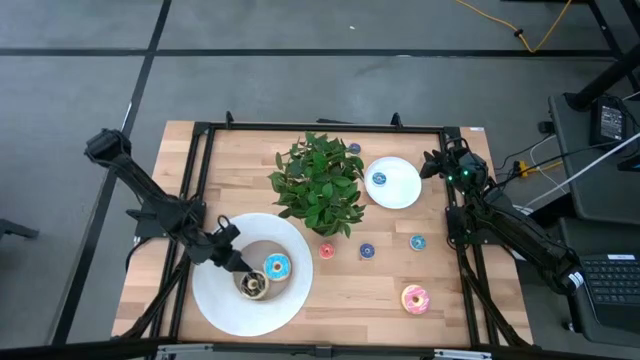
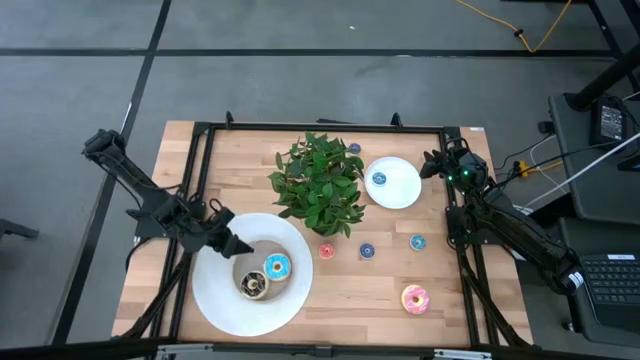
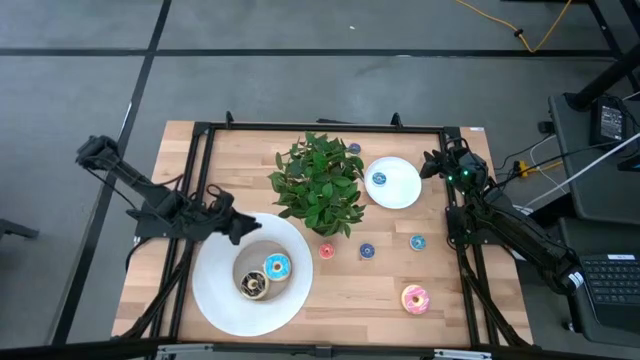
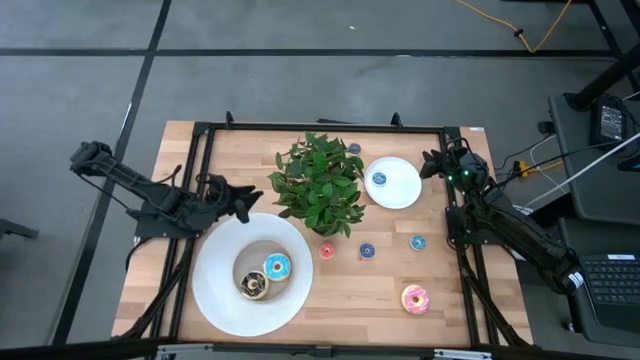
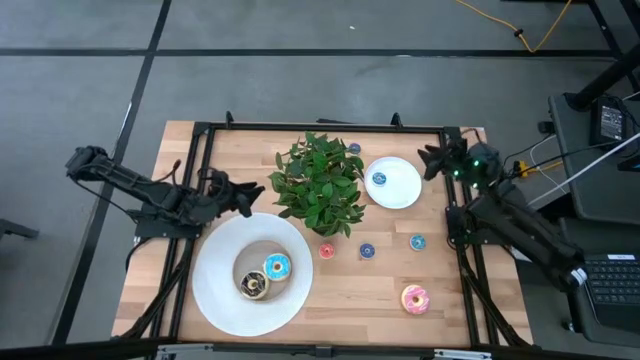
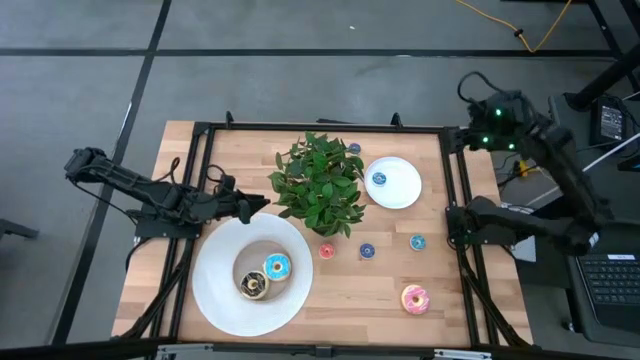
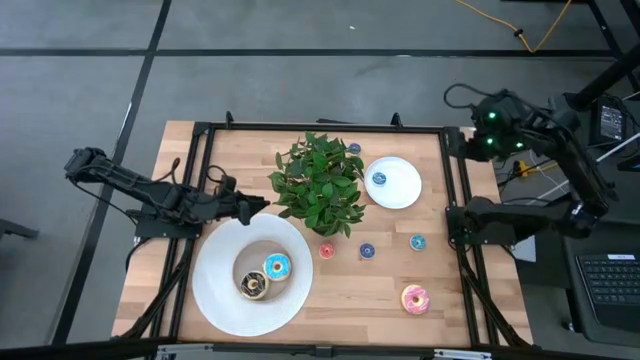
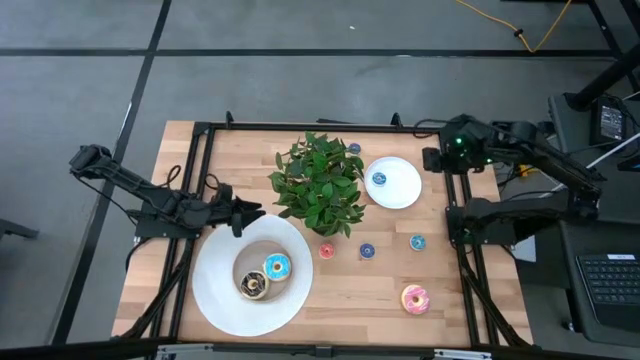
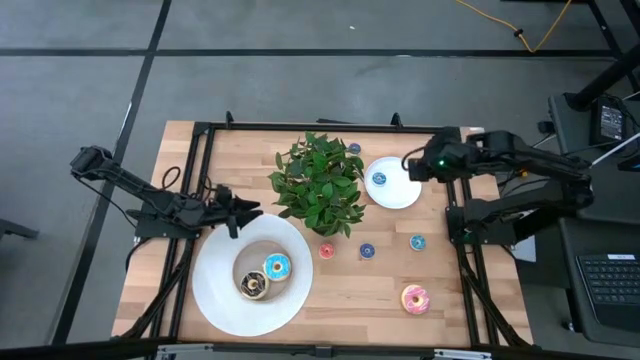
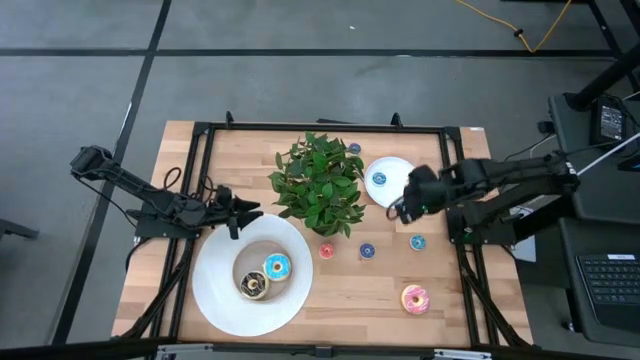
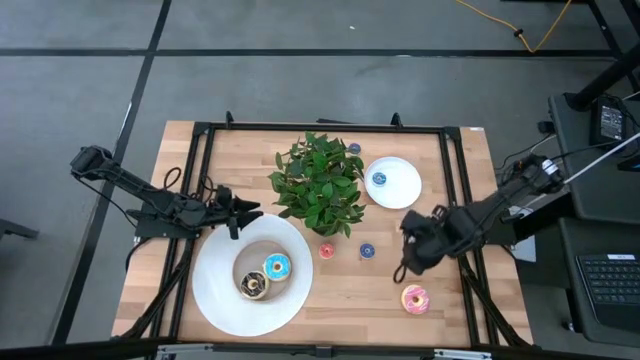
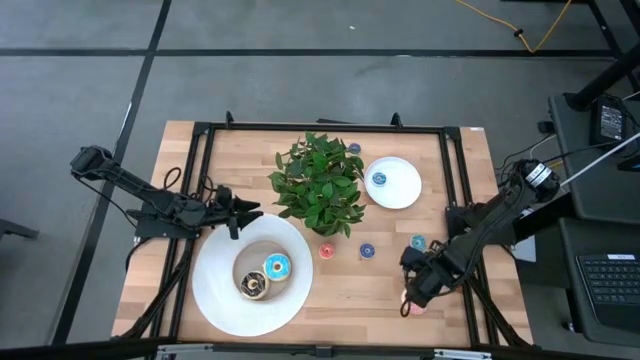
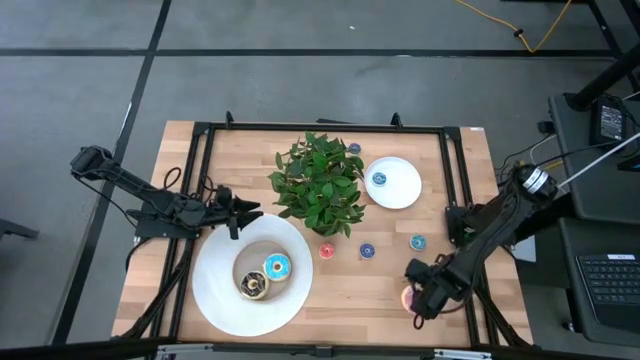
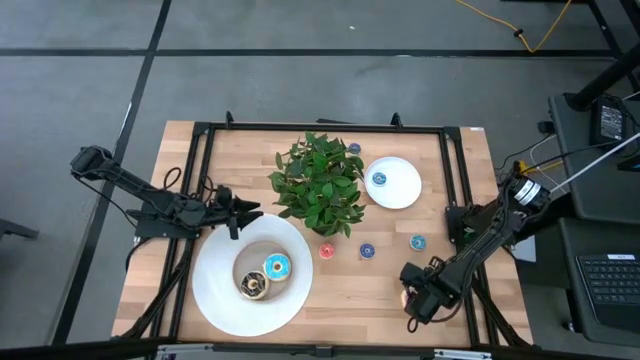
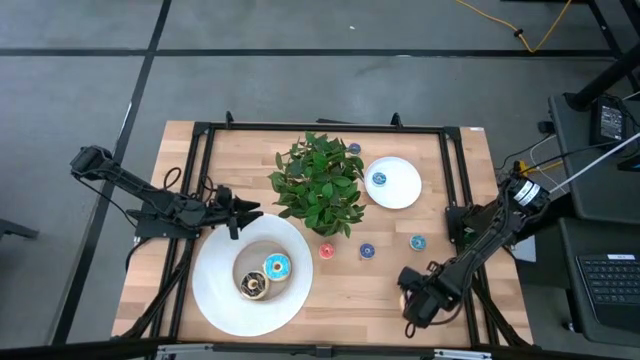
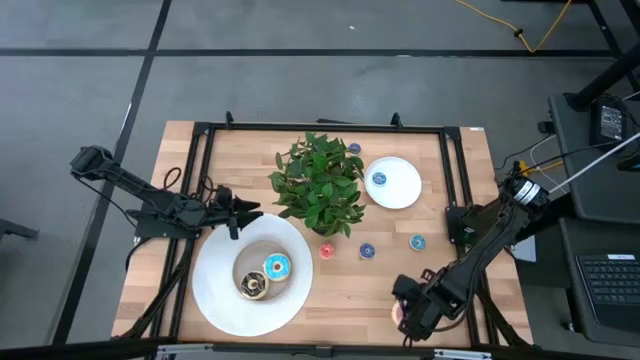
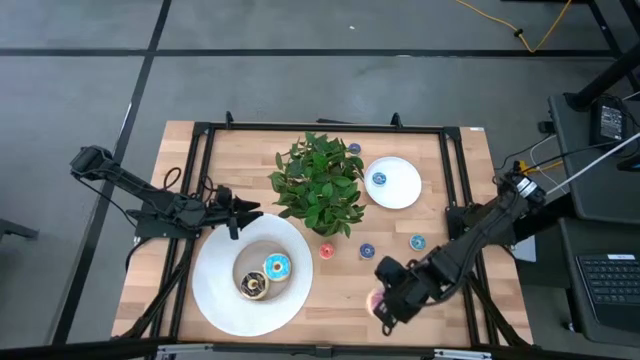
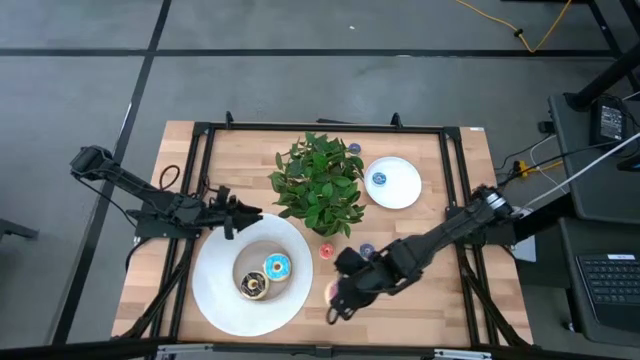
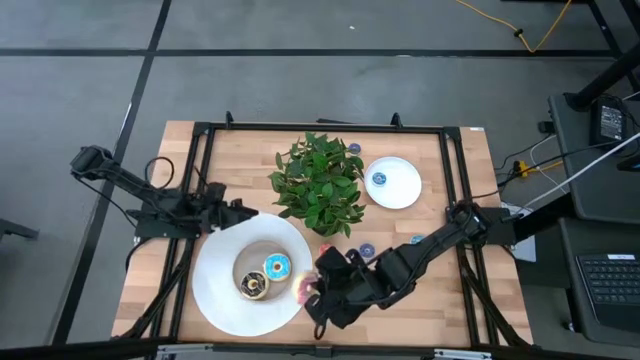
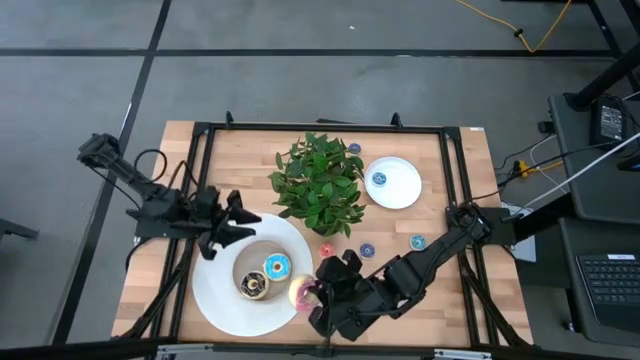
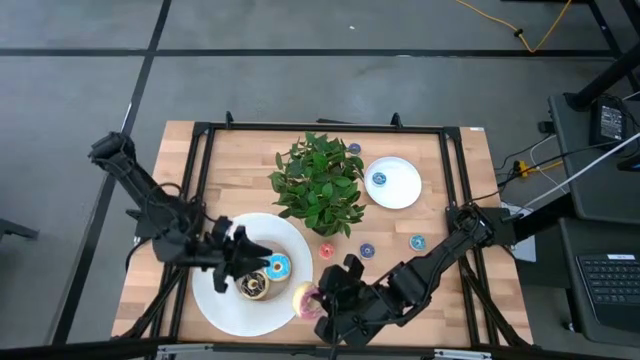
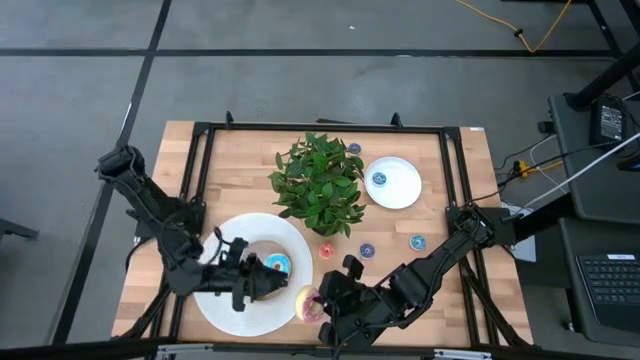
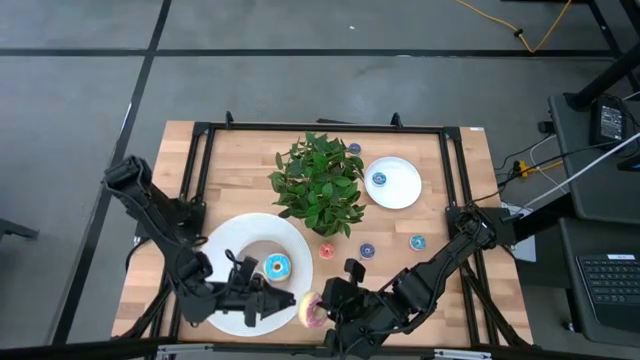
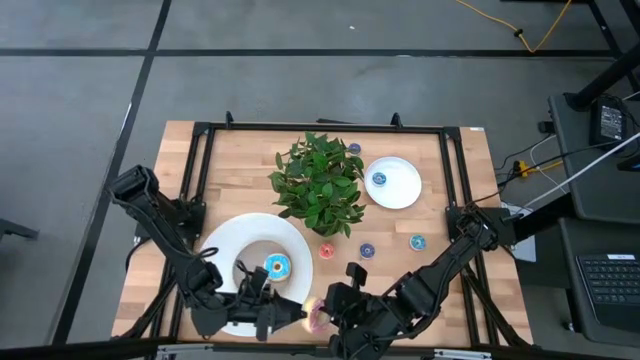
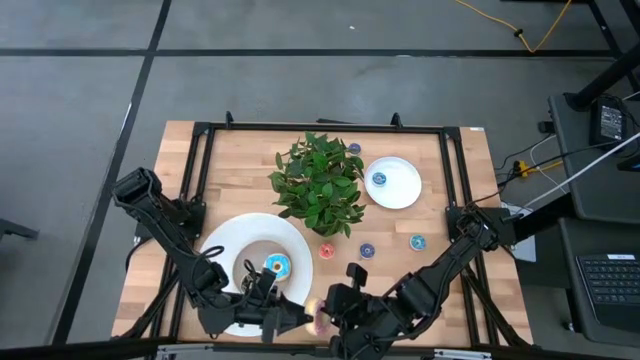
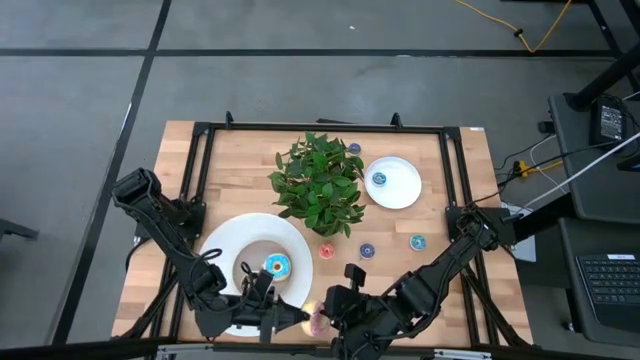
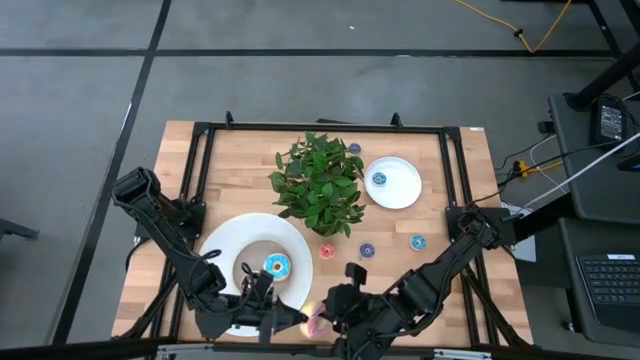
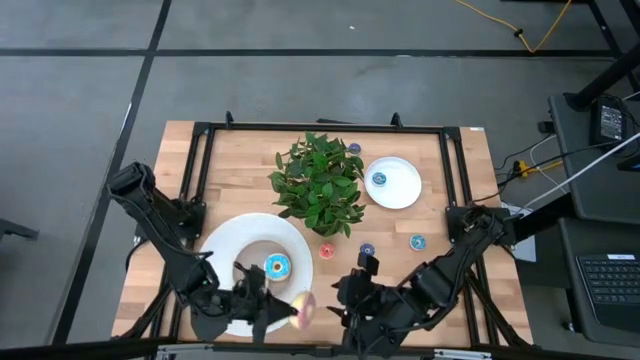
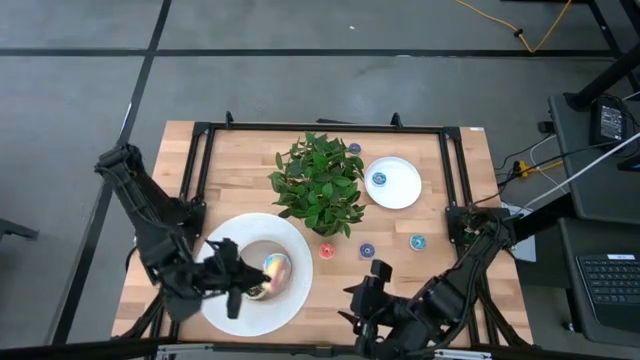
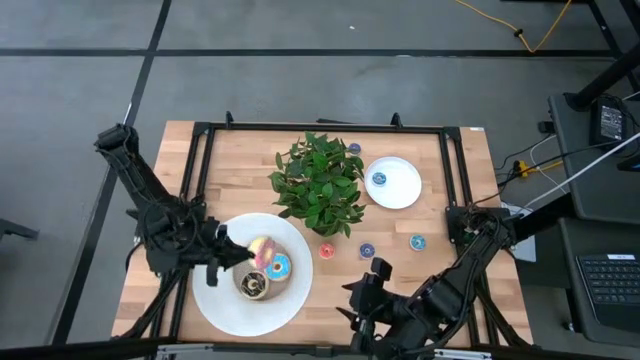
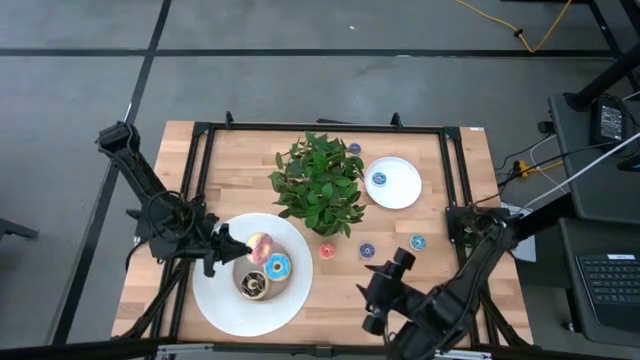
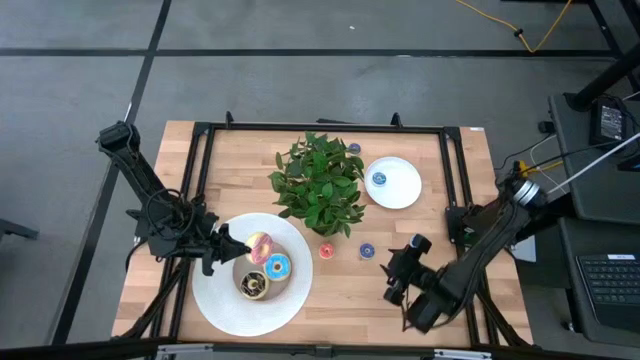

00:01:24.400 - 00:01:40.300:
Task: Pick & Place donuts
Put the large pink donut on the brown plate
